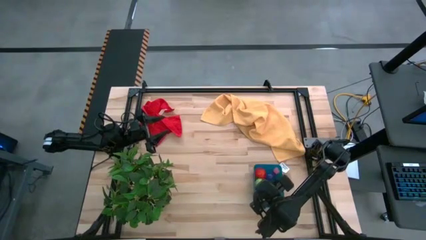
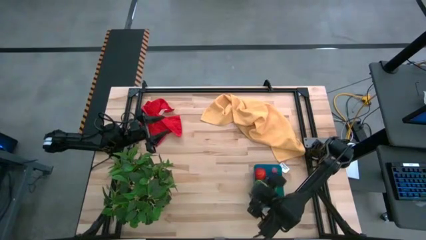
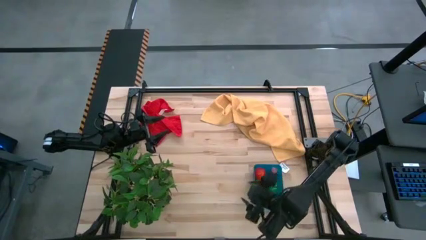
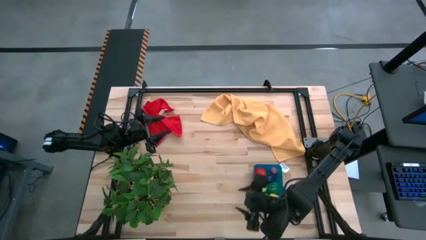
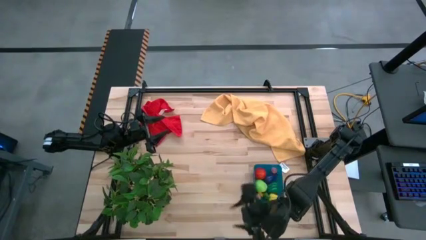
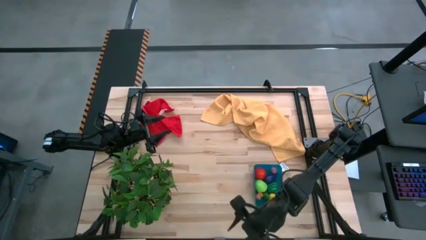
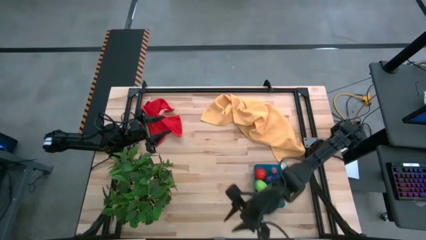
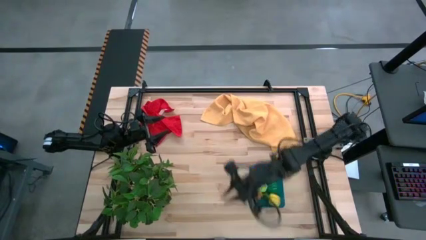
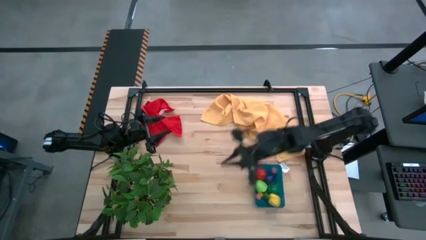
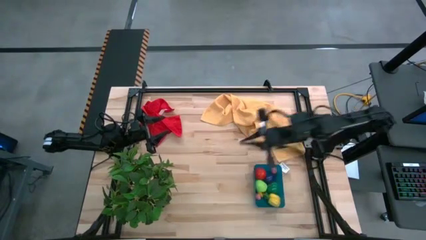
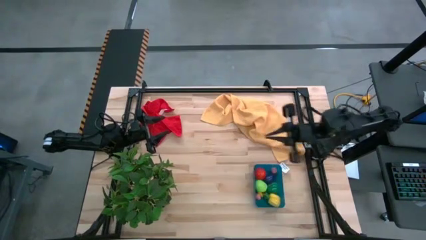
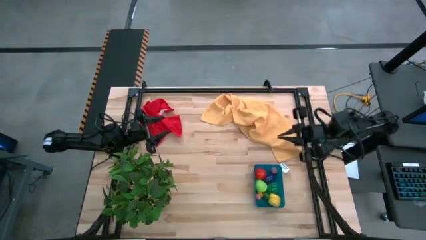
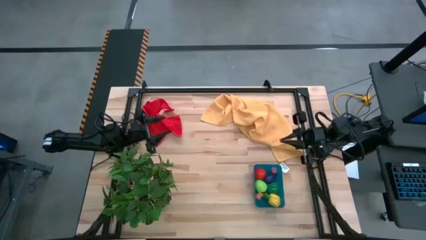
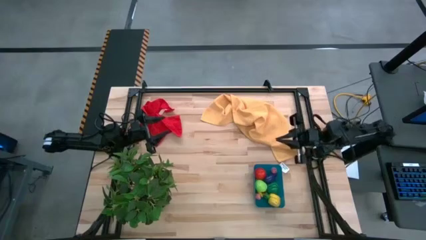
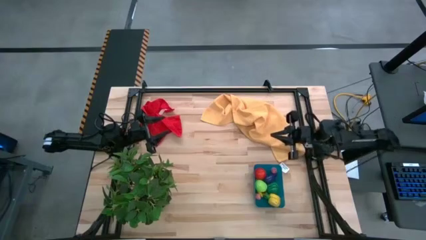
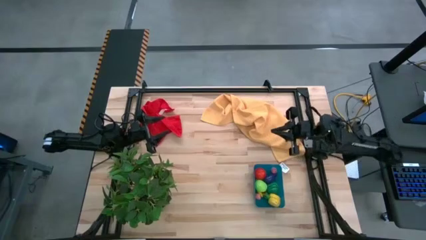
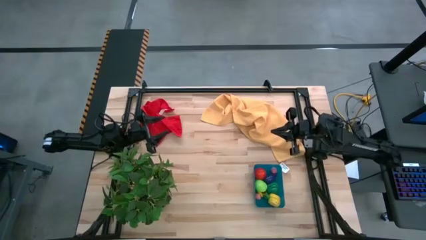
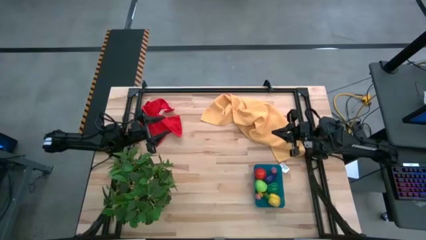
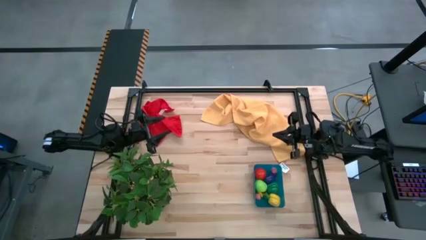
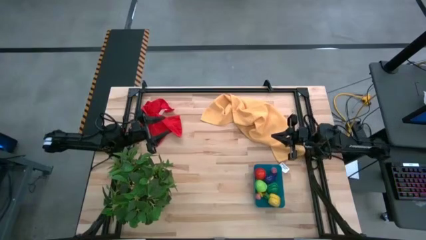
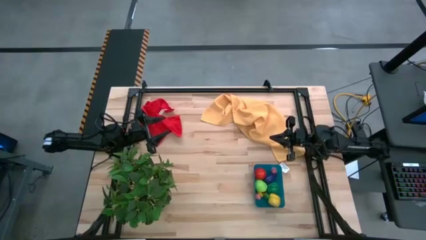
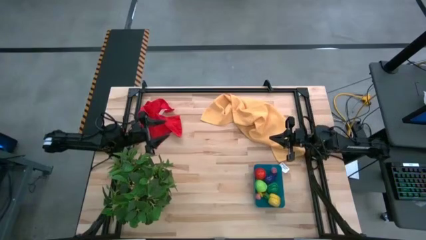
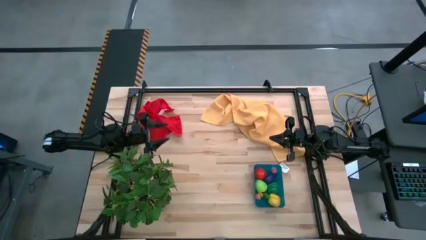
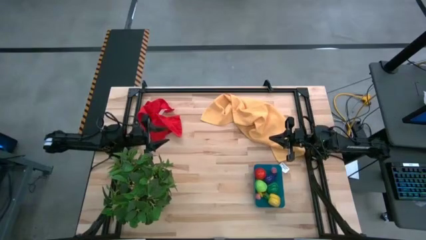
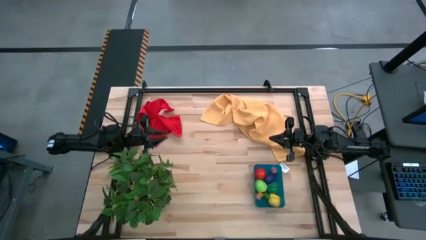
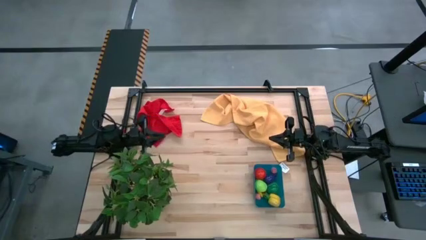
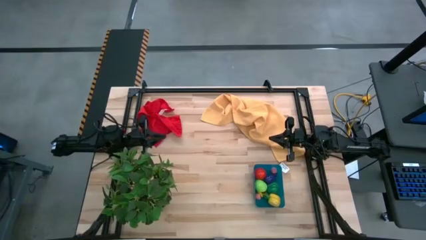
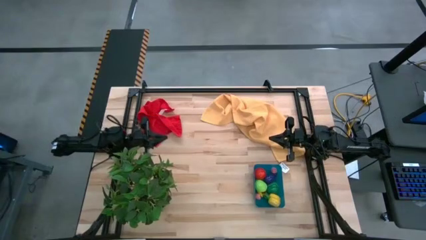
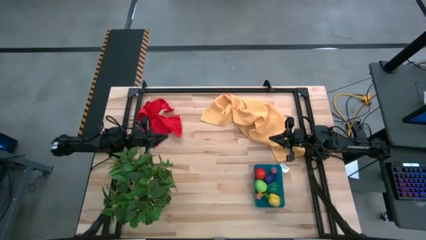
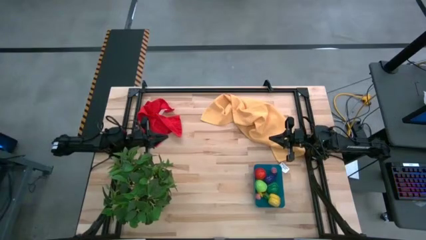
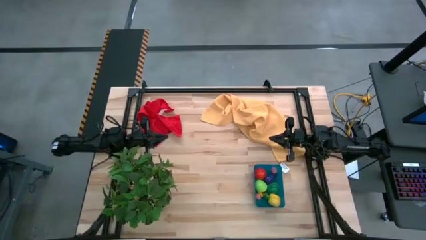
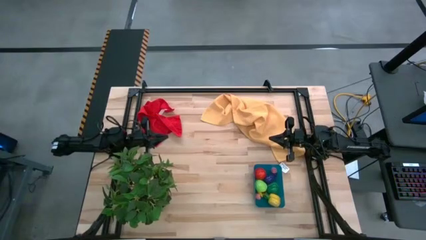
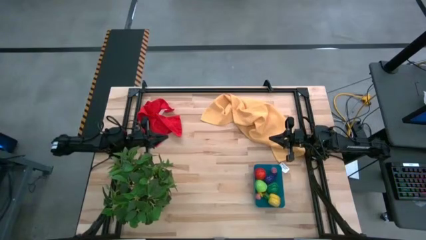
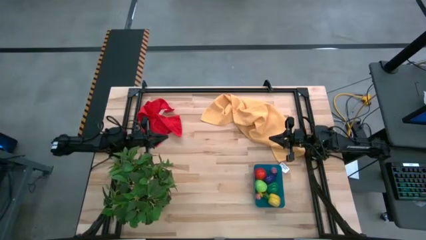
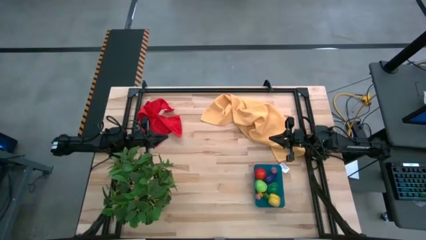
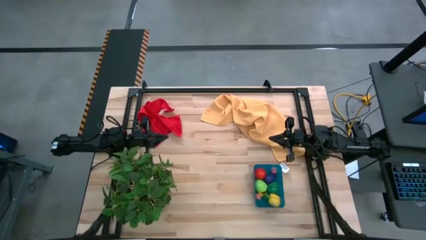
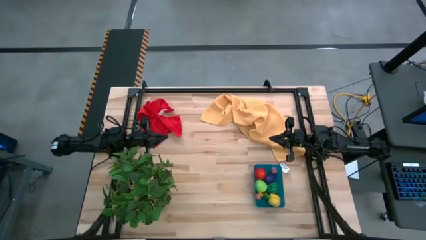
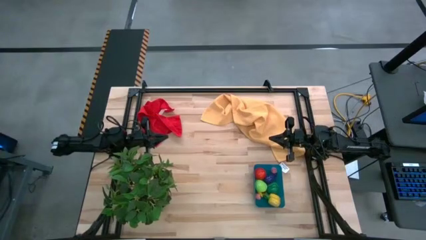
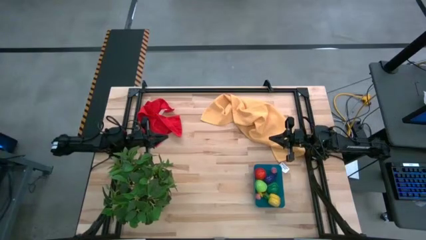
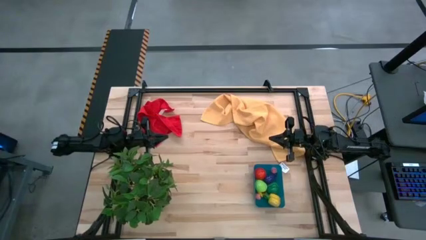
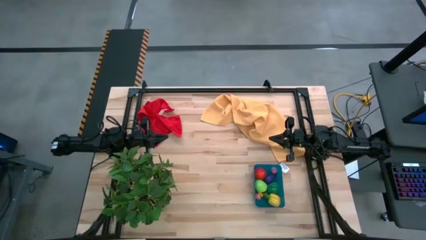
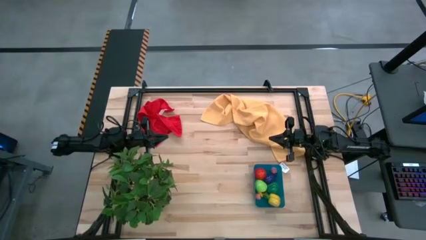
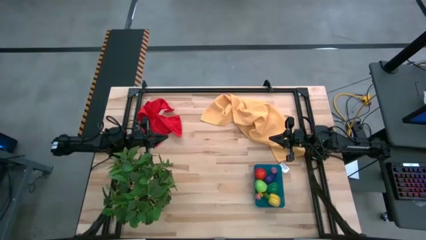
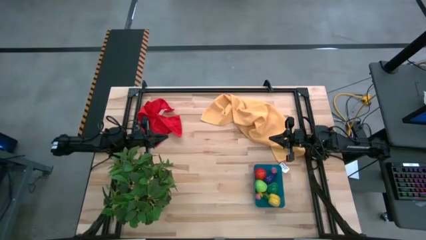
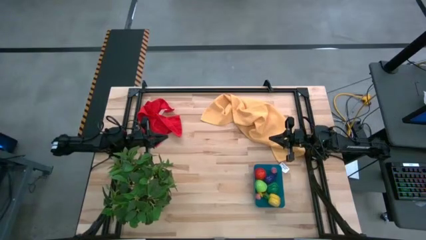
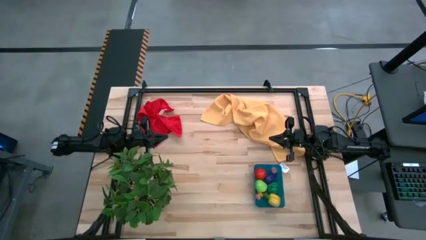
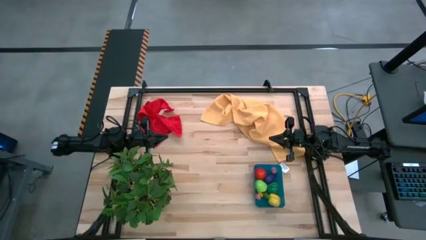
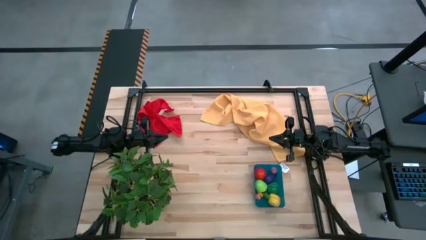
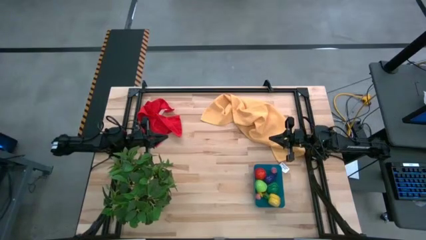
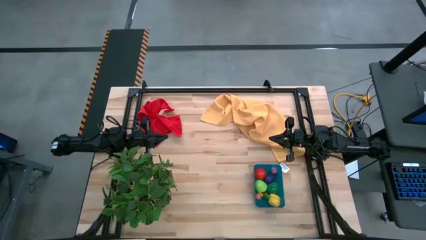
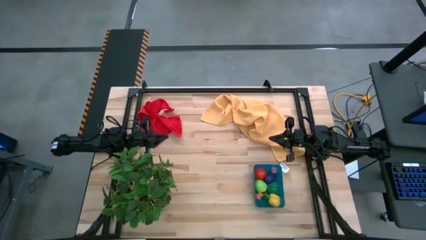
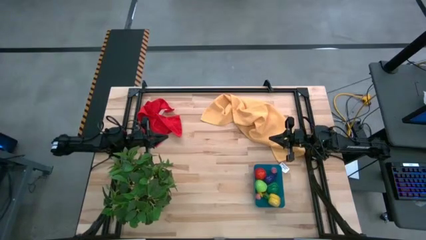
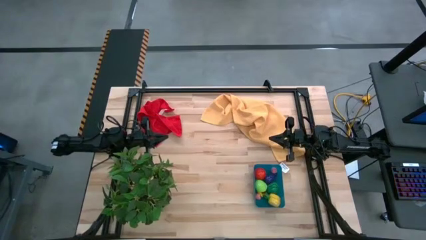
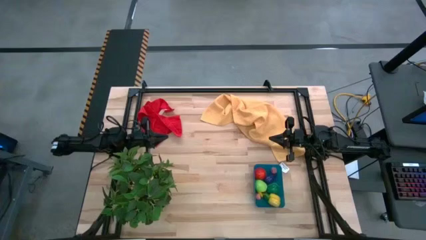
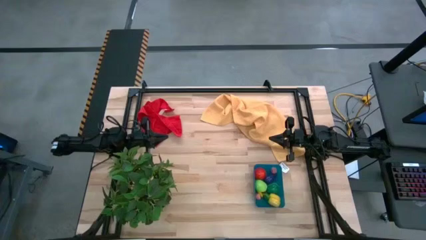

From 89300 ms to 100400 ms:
Task: Pick and placing Produce into tupperware
Return to Home Position

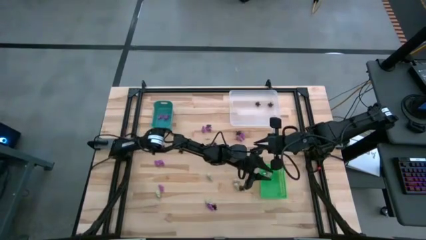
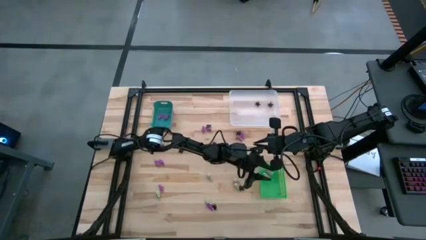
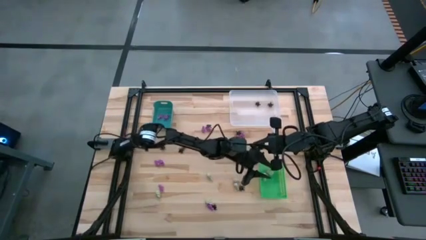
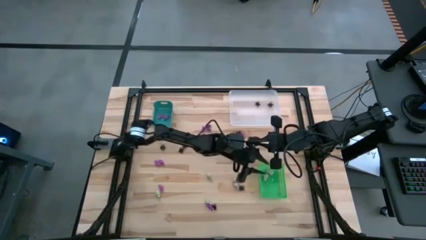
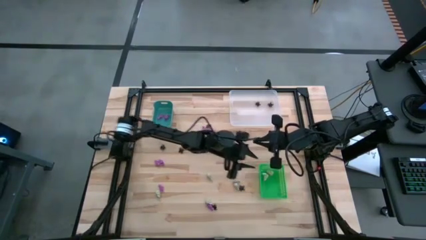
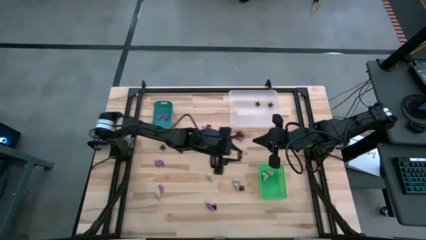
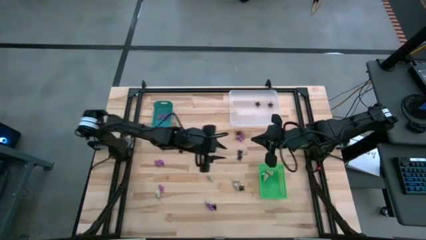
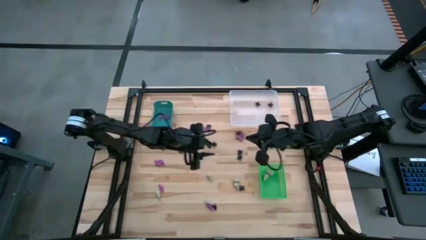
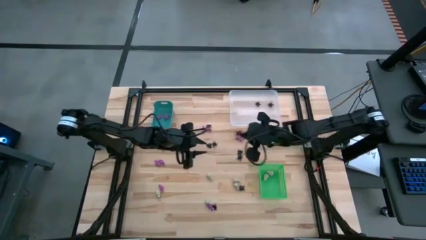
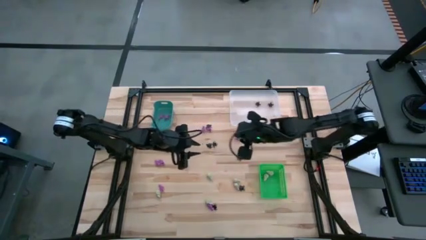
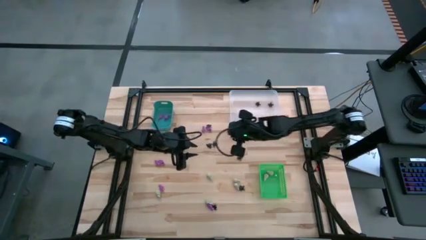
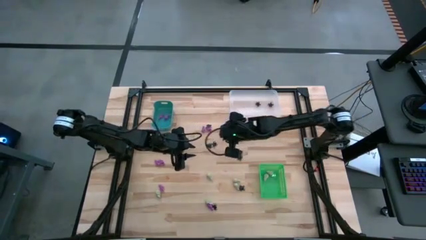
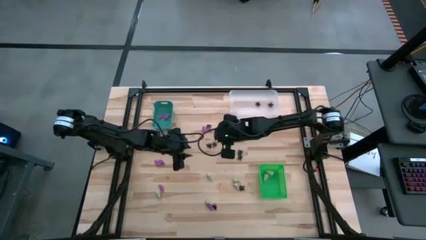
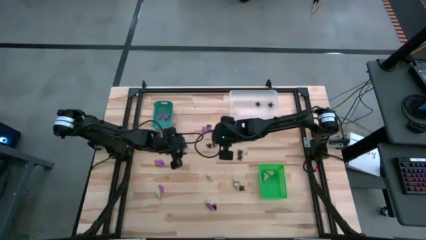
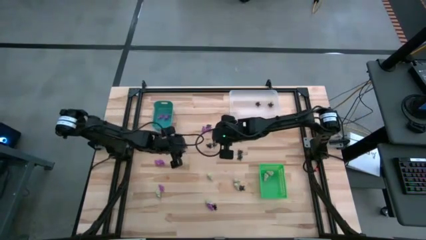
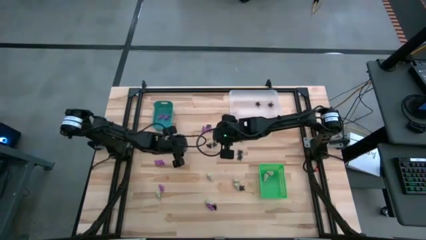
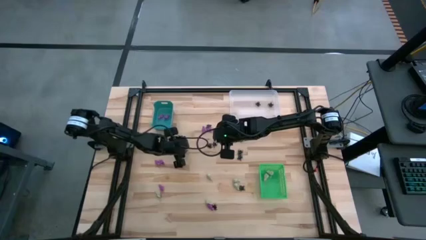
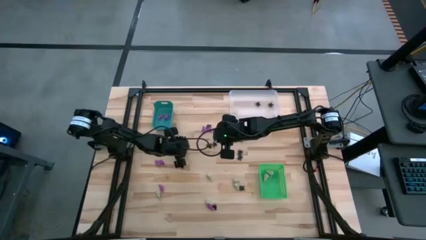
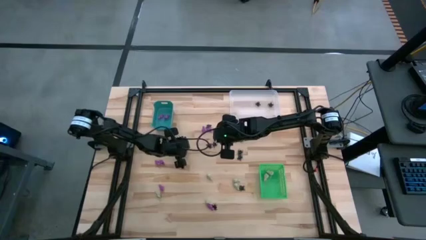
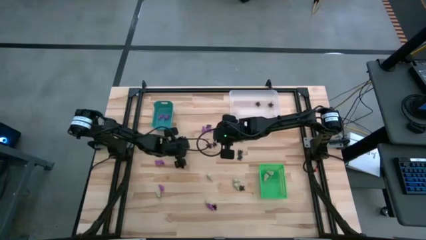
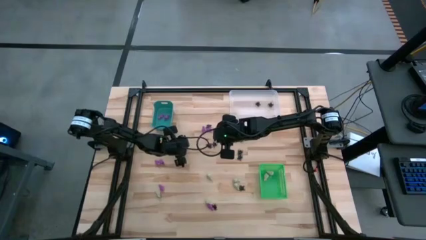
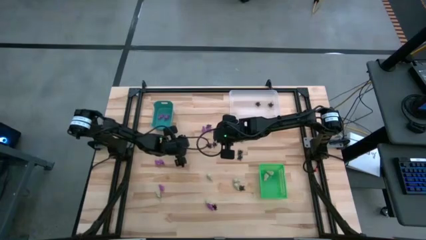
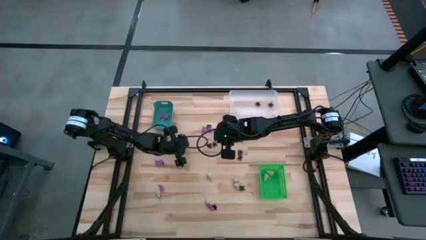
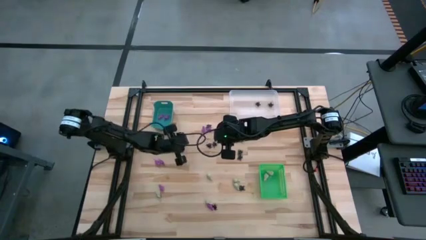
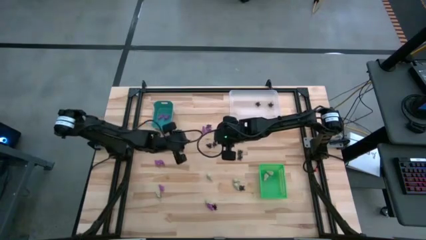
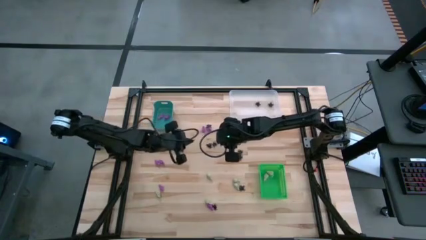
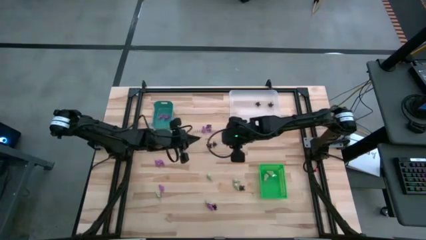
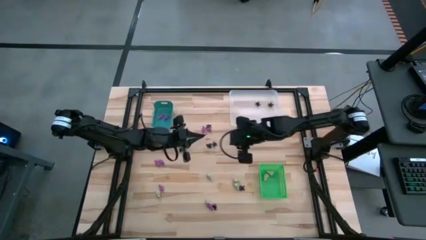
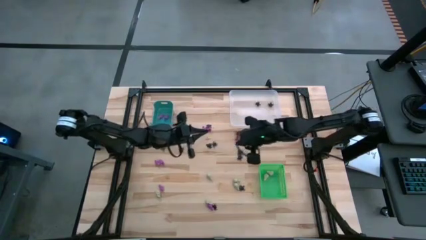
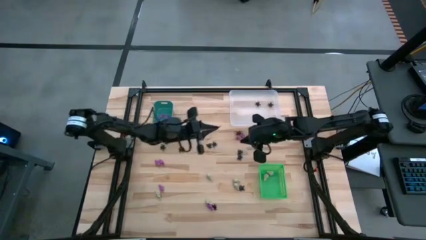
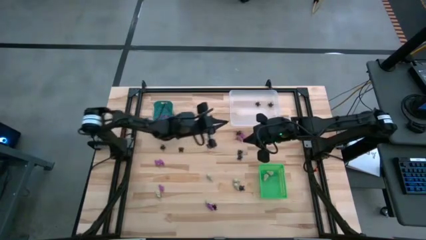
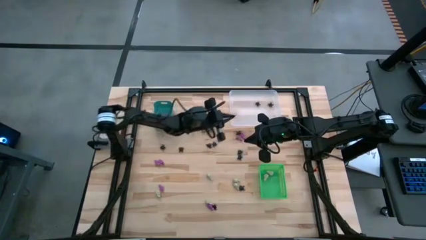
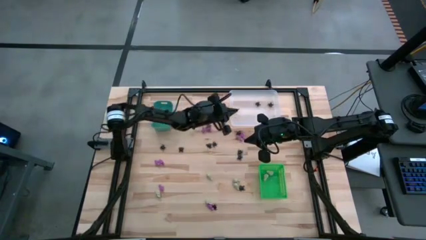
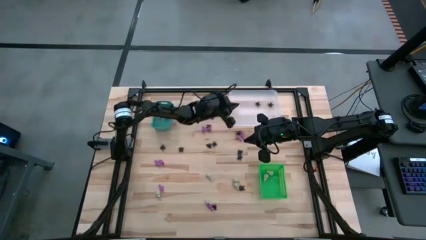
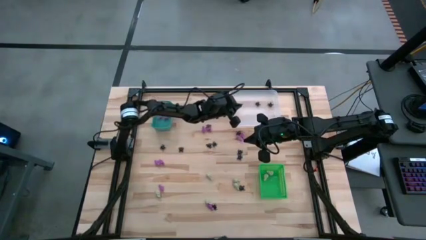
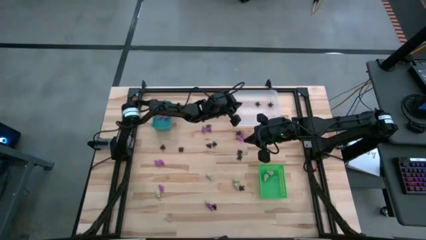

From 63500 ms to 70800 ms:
Task: Sort Halloween decoration
Put the black spider toy into the white bin
